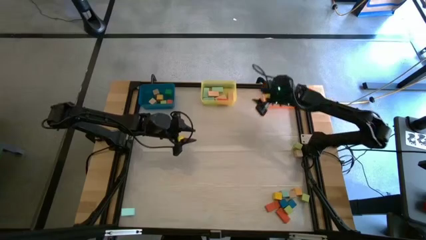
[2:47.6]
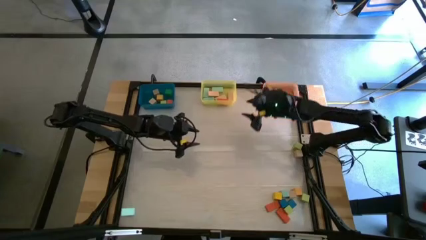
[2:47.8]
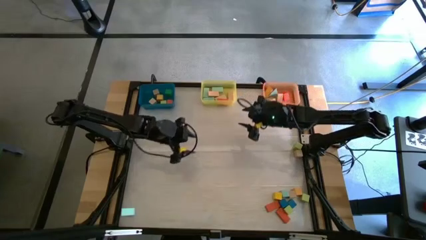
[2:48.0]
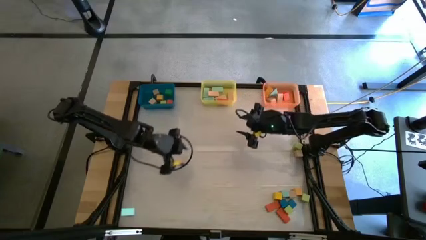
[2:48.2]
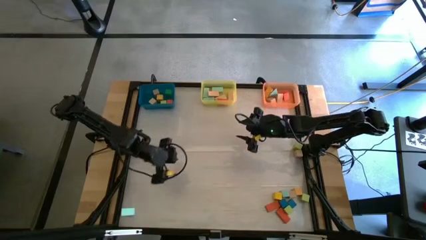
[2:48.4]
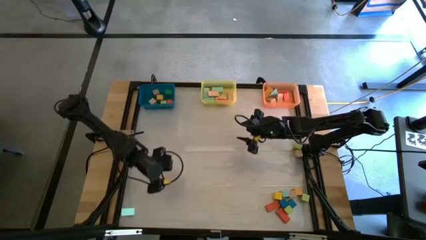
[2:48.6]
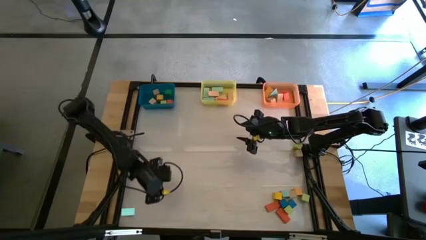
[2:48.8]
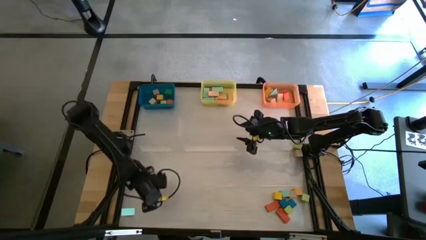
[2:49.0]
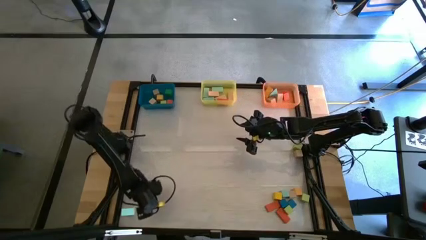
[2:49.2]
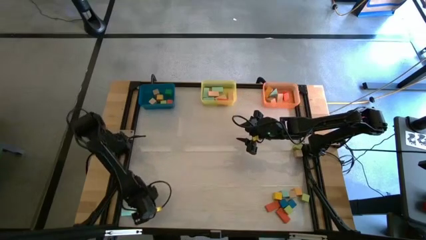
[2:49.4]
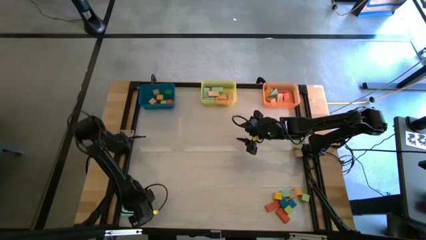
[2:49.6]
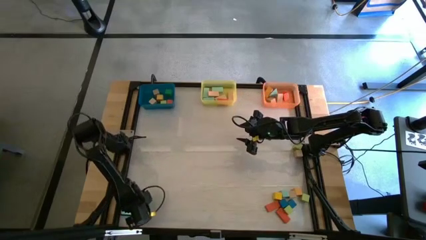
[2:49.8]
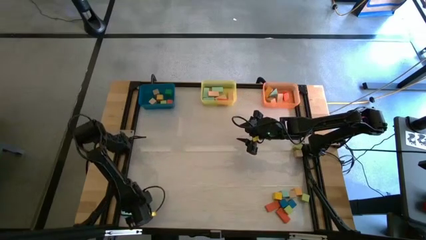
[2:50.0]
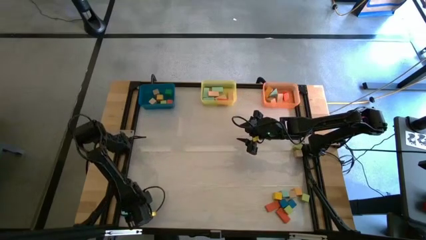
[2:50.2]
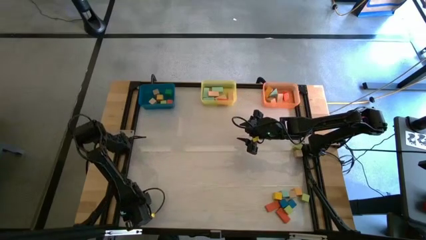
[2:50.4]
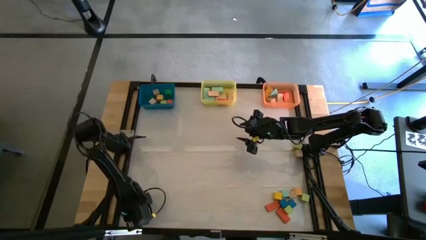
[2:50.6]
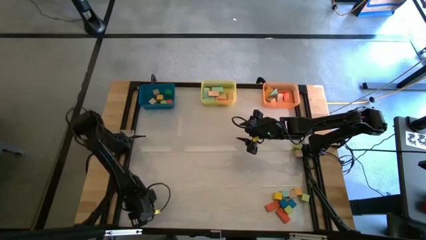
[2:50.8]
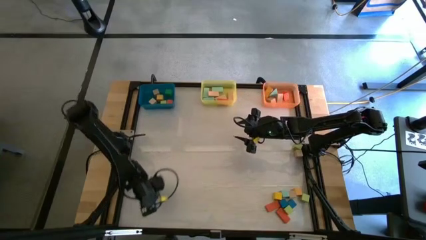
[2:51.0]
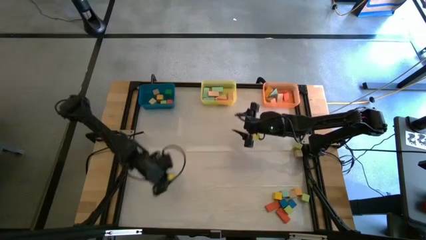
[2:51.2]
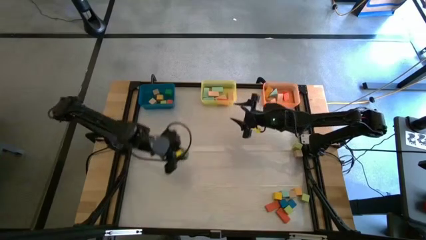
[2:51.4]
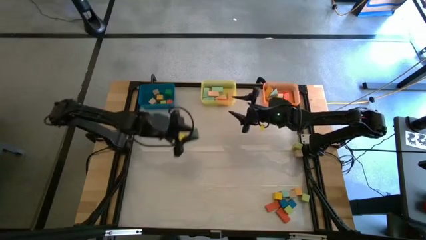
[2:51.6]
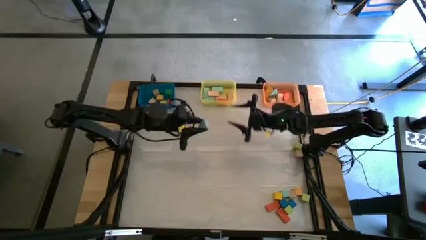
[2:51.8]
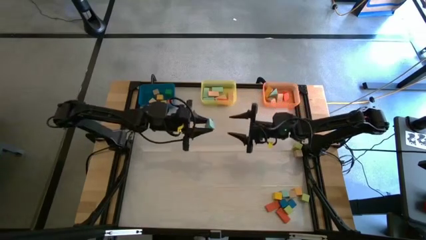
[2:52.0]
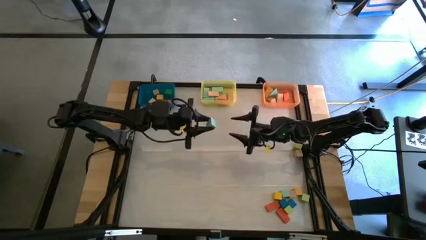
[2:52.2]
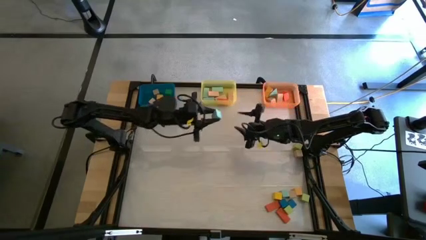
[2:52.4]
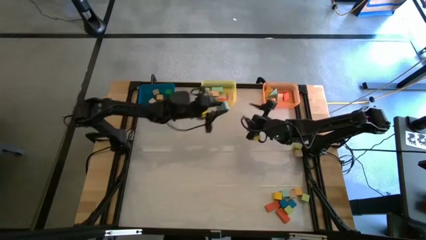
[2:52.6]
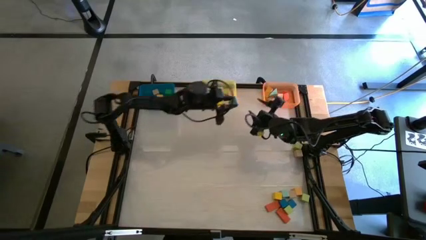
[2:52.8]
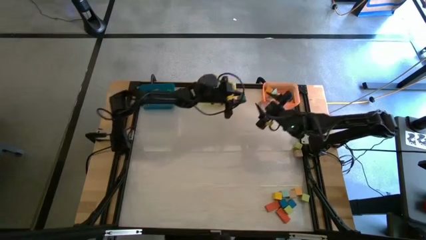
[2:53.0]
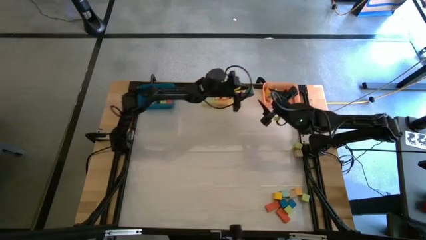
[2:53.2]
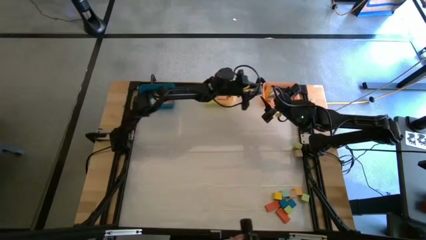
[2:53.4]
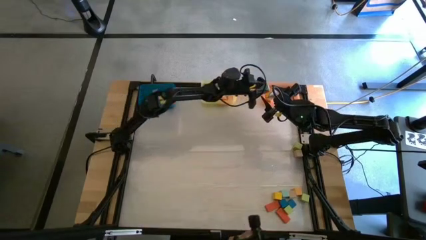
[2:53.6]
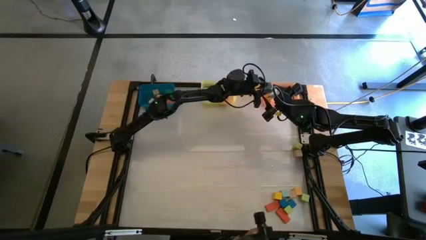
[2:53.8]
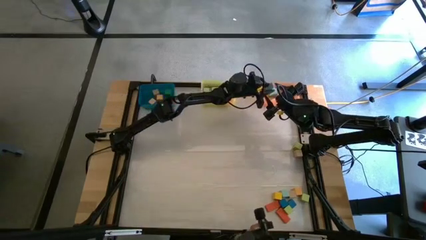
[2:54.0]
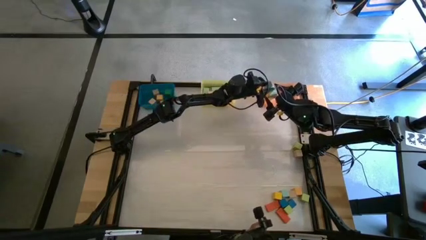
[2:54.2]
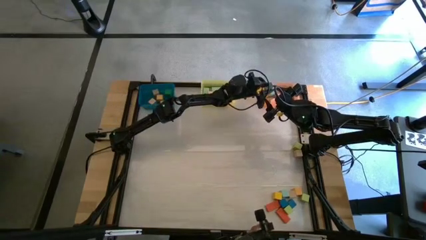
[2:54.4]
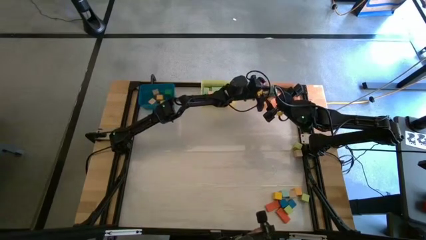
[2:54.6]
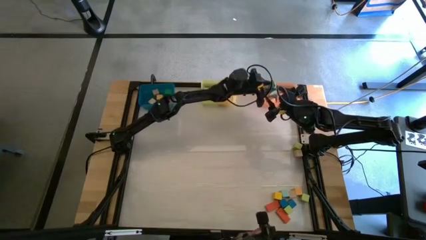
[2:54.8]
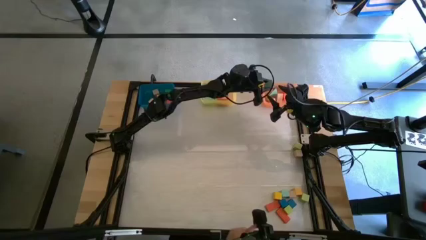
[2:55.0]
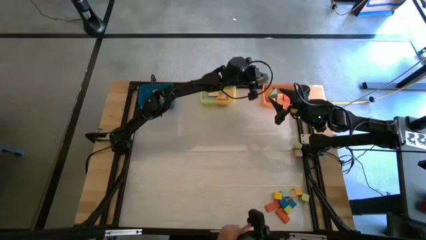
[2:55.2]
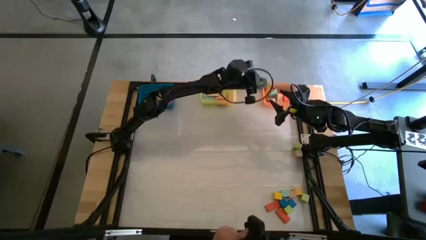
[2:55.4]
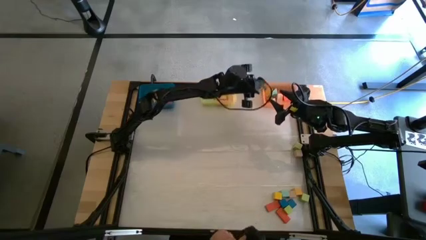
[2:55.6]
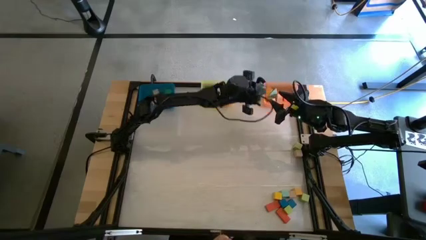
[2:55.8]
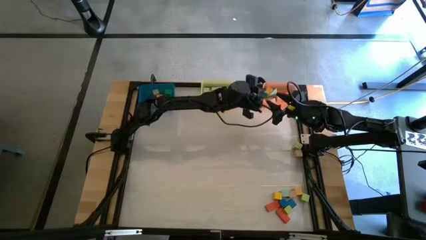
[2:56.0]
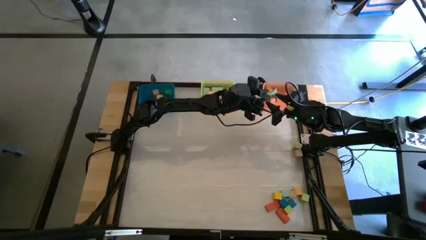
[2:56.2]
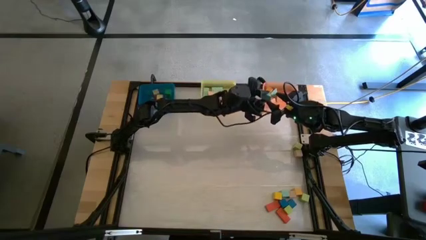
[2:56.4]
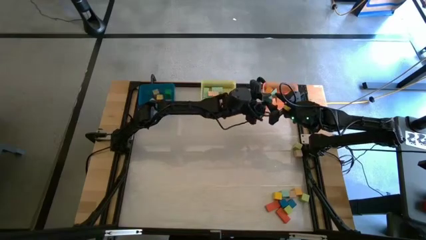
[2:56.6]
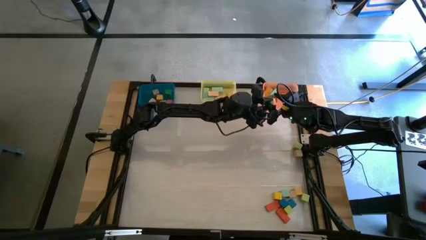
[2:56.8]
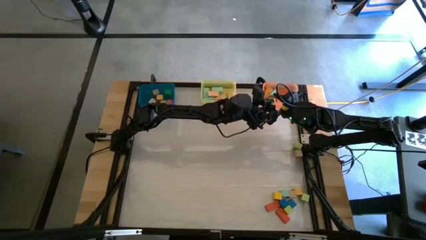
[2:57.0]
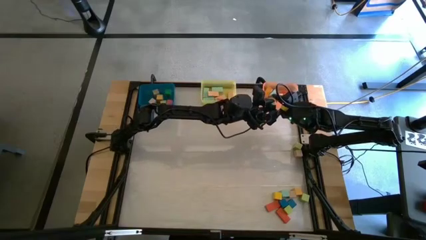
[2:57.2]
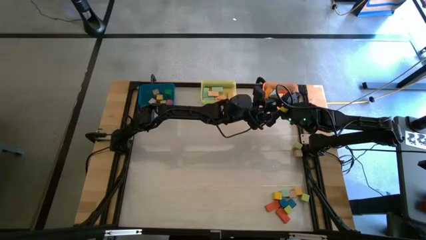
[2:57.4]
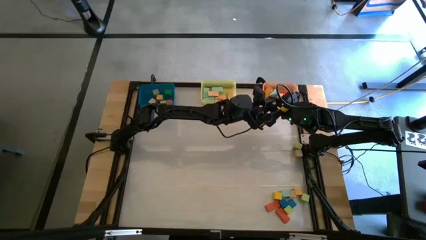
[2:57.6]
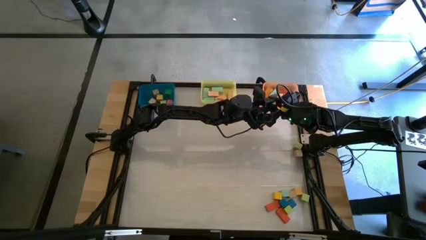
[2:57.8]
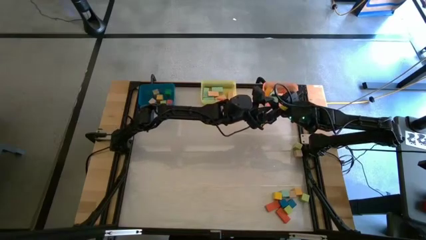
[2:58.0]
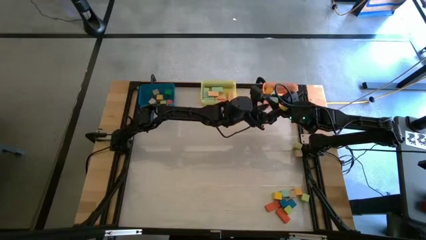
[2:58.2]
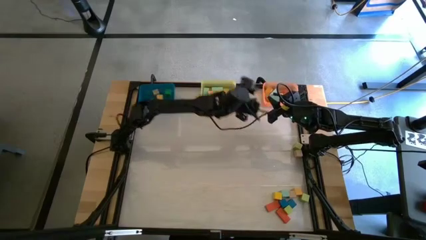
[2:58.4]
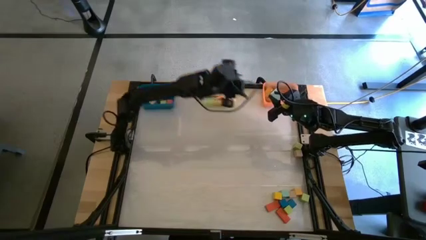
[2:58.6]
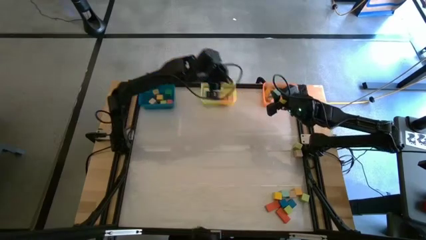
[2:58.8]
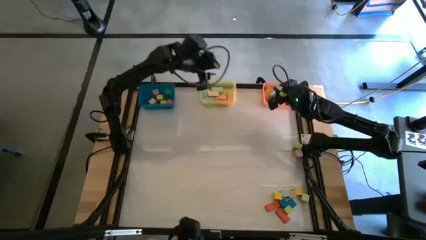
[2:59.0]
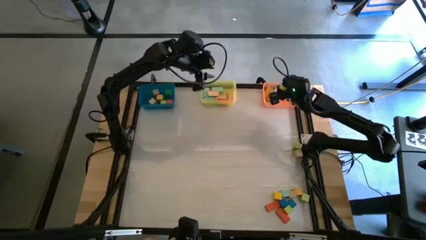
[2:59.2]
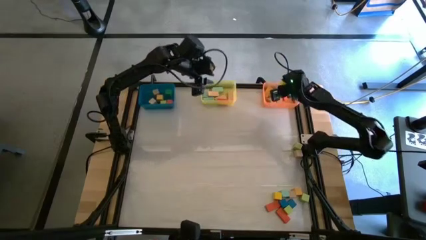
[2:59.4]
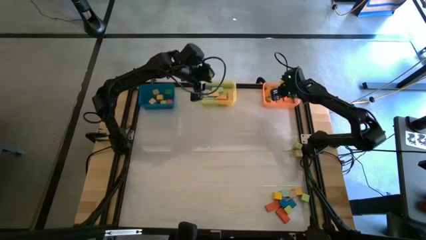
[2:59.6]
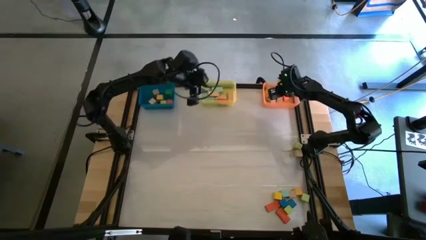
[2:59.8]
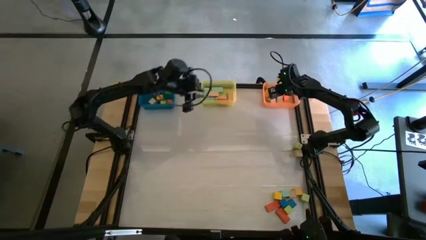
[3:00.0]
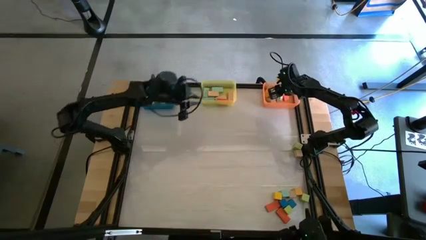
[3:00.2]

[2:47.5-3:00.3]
Task: Sort blocks by size
Put the light blue triangle block into the orange bin

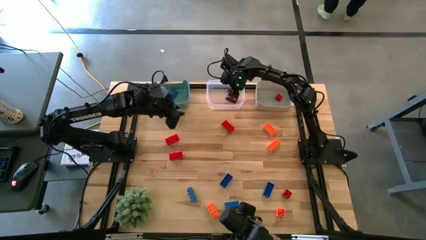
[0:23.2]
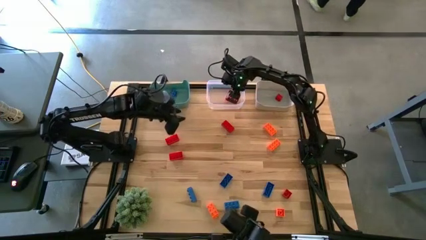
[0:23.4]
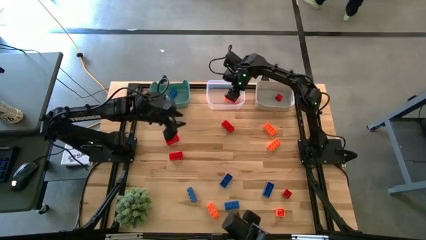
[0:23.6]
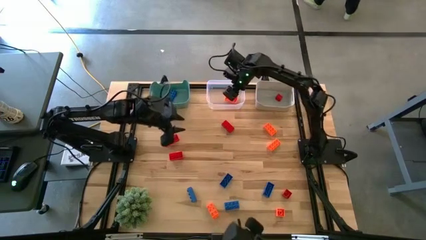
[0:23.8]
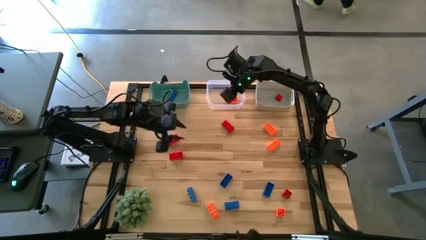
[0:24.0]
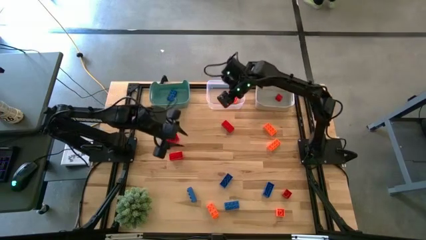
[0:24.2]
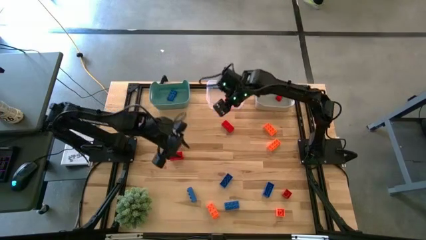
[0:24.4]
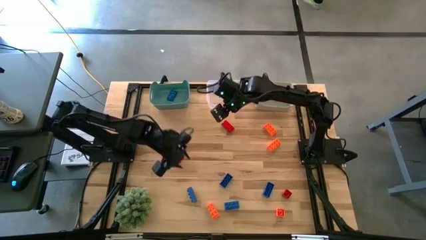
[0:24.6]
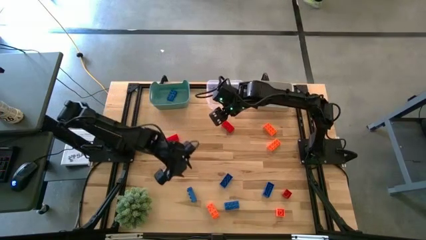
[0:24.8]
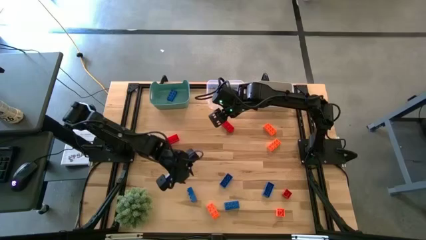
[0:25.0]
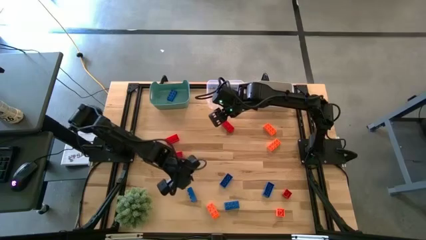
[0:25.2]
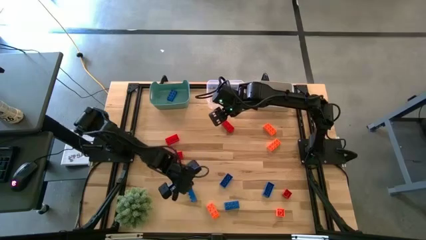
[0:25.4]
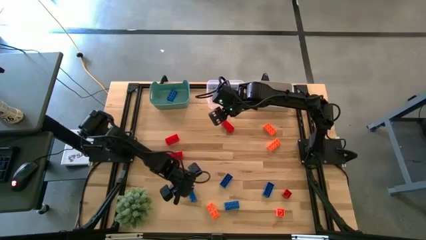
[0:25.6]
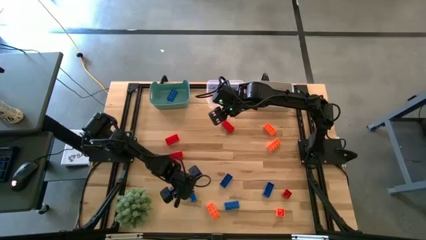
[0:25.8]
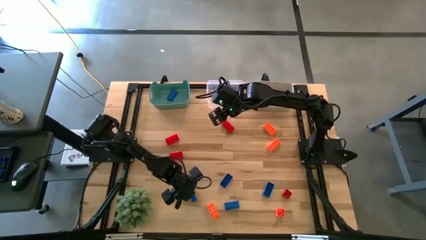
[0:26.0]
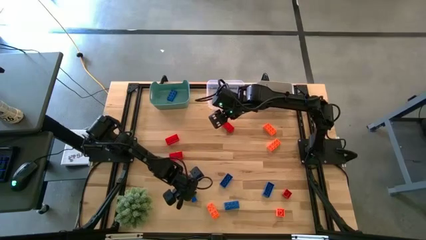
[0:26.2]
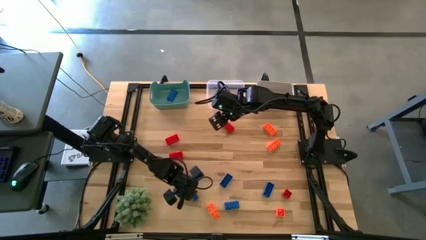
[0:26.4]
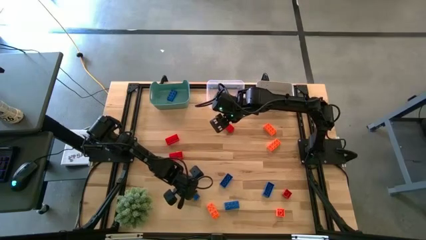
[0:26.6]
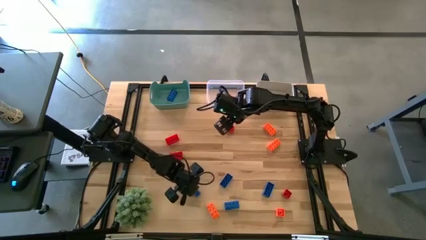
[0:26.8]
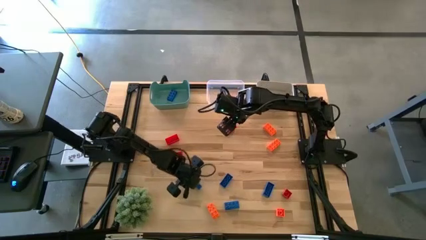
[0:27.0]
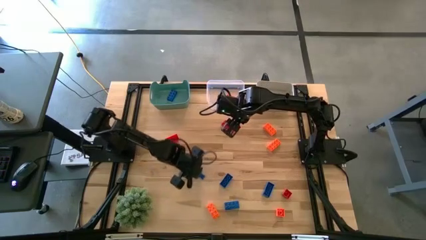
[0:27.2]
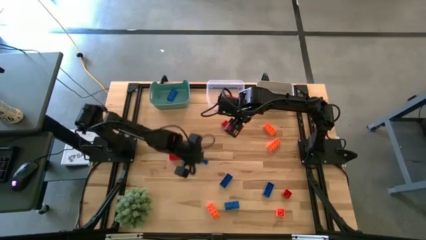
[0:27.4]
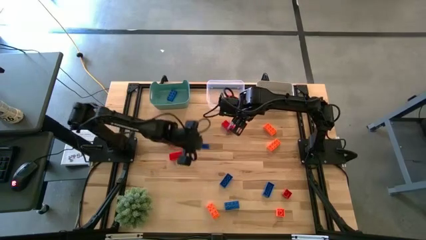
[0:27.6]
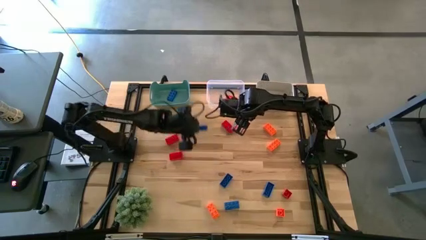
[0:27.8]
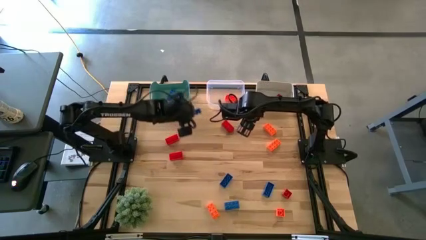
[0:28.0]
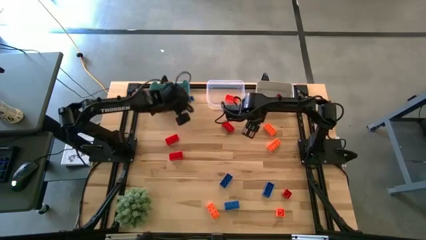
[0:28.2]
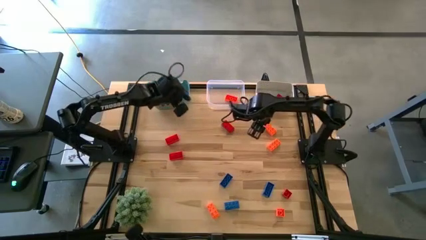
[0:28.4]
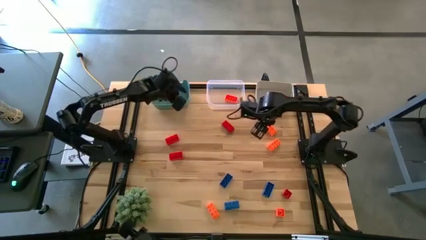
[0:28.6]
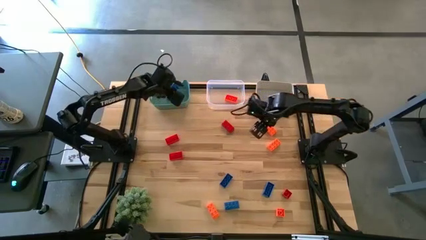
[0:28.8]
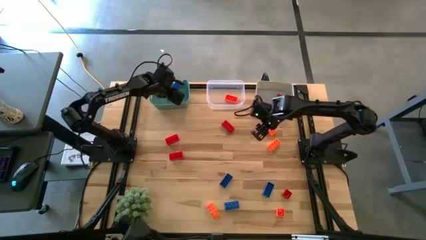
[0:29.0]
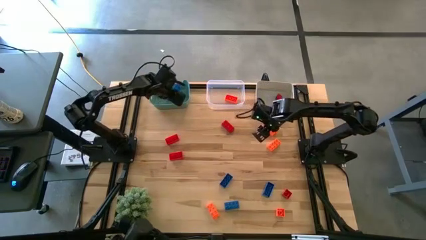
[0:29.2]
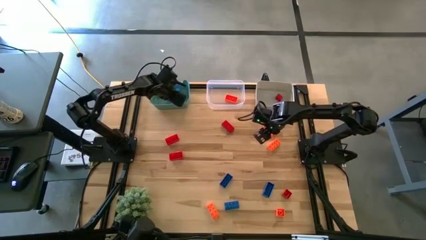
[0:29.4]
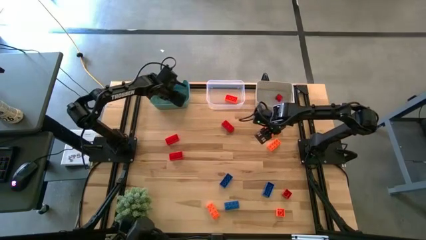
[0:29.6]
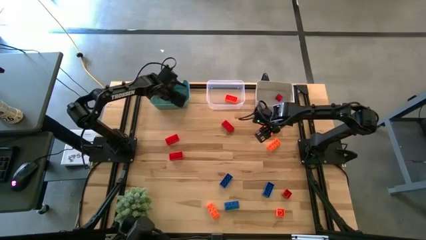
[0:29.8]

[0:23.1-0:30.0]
Task: Sort & place blocks by color
Put the blue game piece into the green bin
